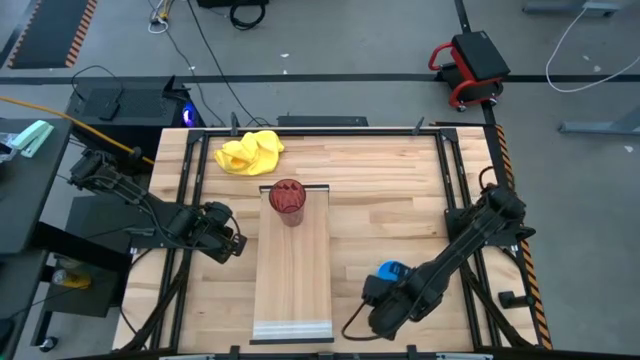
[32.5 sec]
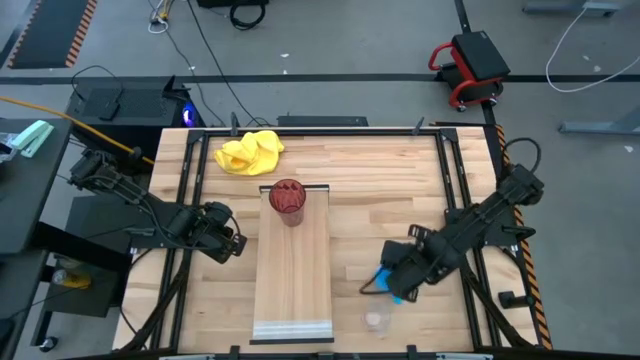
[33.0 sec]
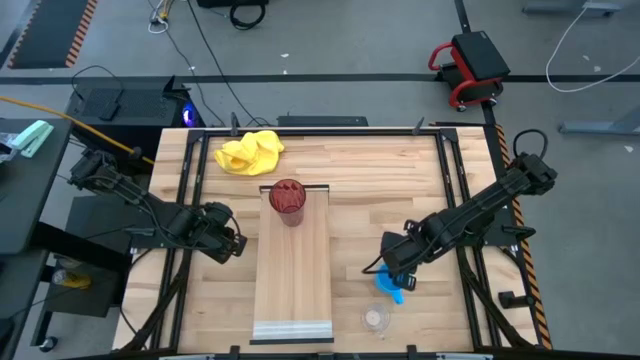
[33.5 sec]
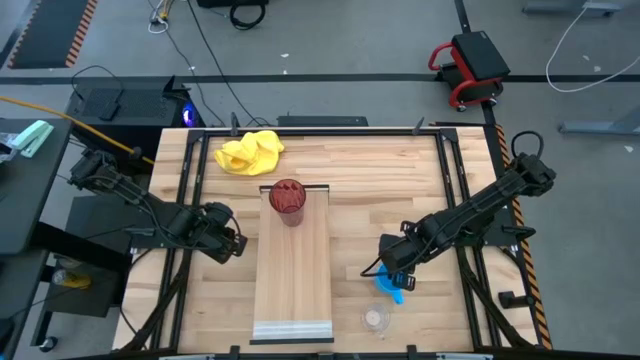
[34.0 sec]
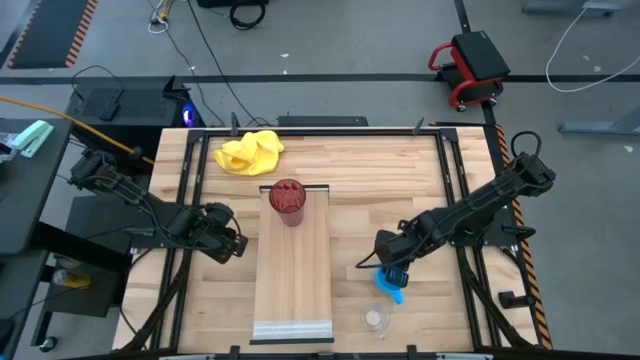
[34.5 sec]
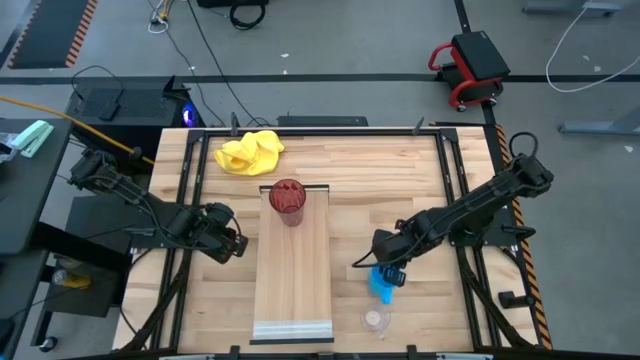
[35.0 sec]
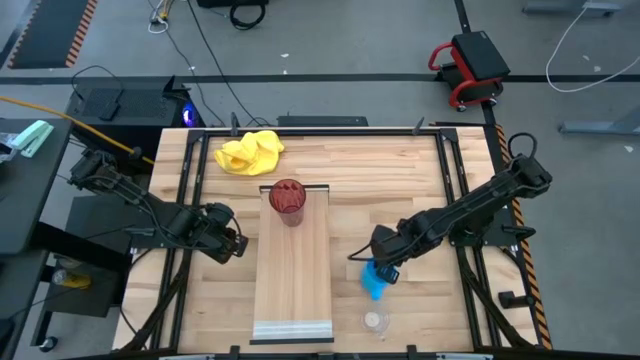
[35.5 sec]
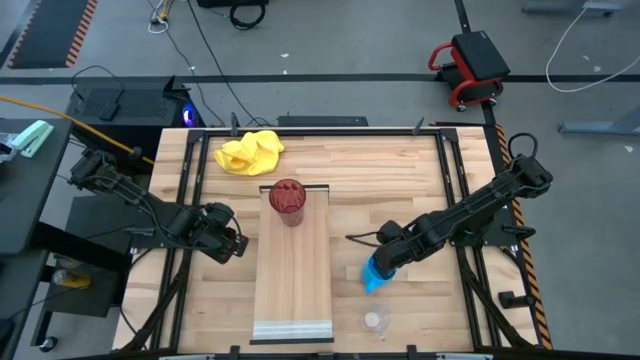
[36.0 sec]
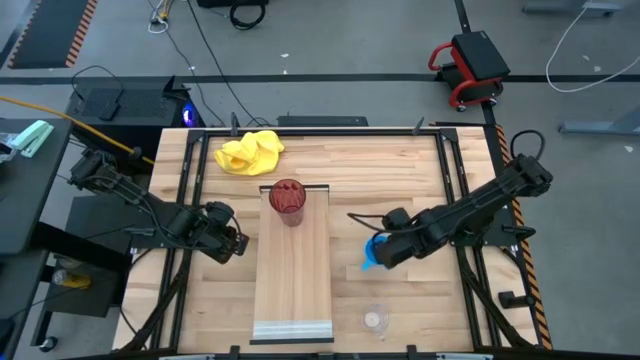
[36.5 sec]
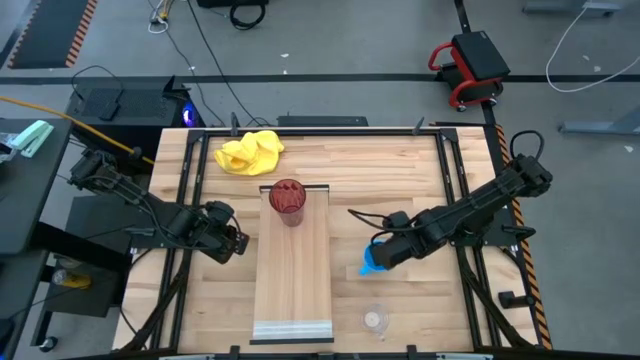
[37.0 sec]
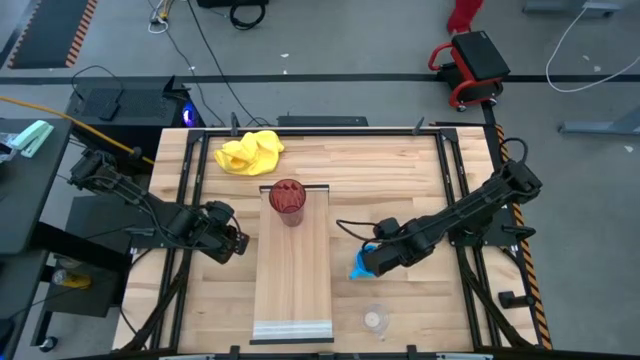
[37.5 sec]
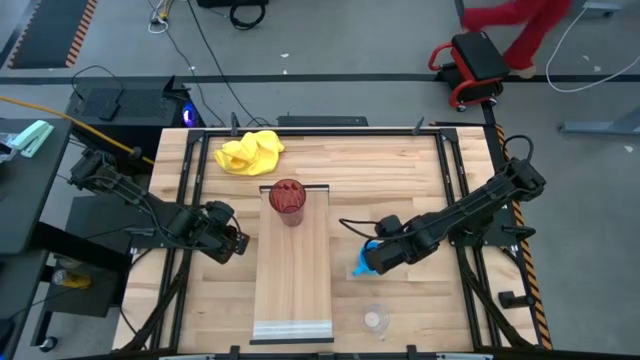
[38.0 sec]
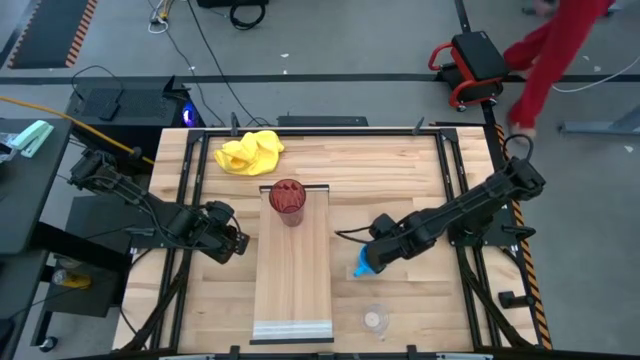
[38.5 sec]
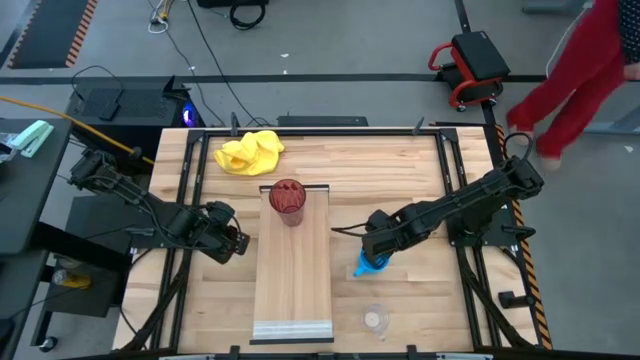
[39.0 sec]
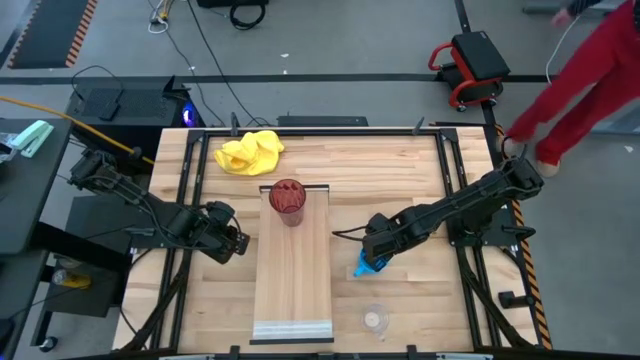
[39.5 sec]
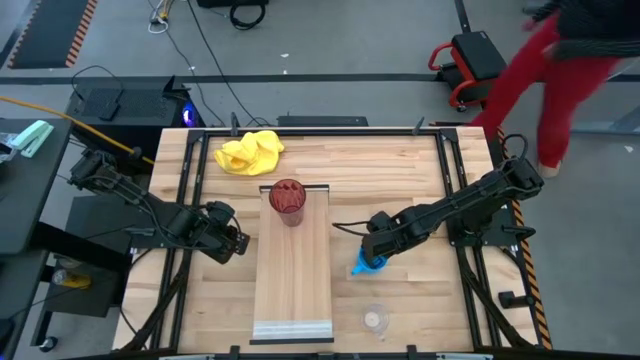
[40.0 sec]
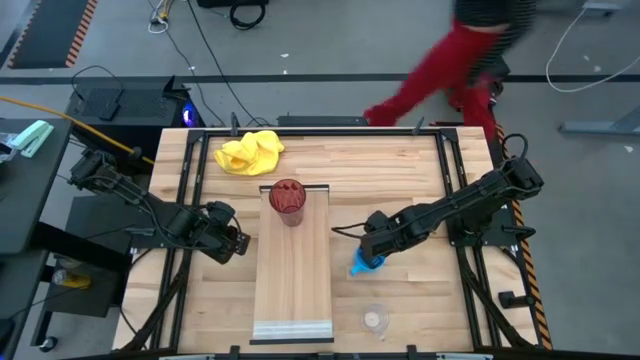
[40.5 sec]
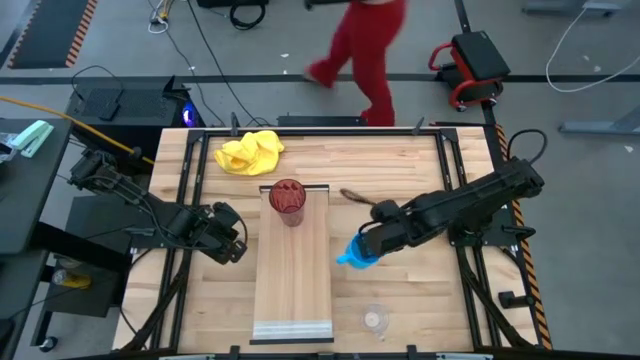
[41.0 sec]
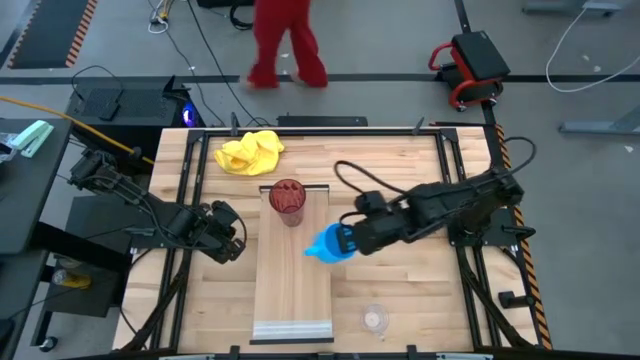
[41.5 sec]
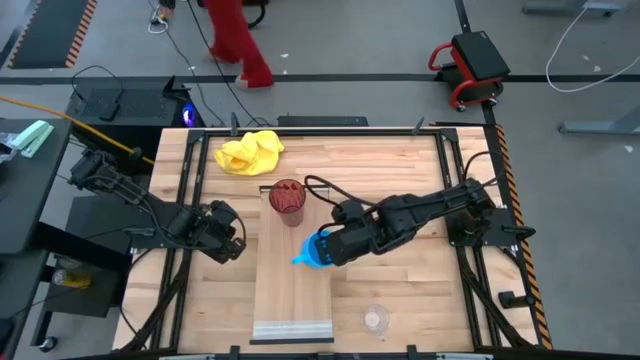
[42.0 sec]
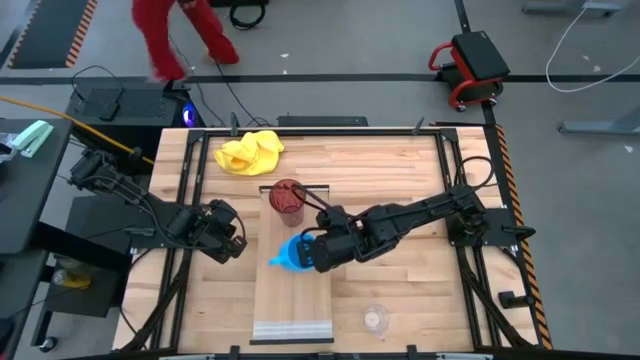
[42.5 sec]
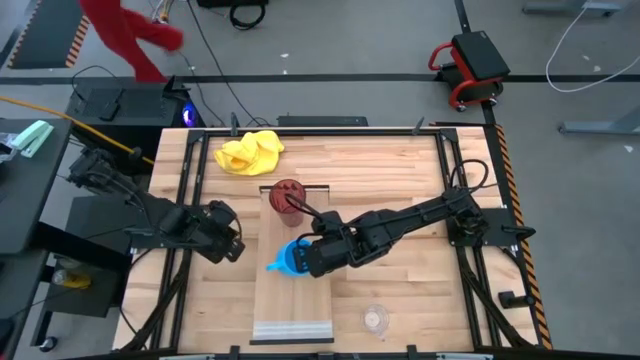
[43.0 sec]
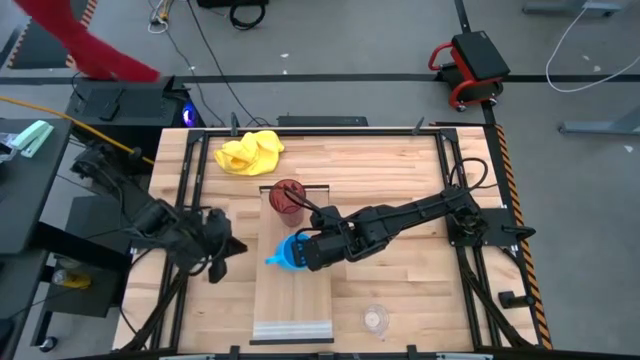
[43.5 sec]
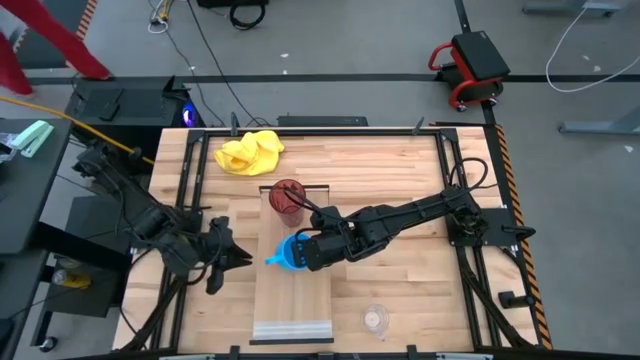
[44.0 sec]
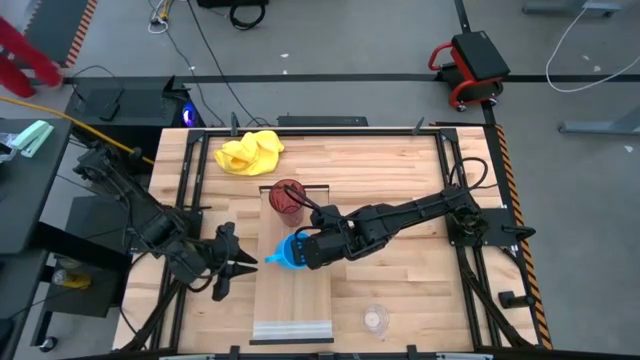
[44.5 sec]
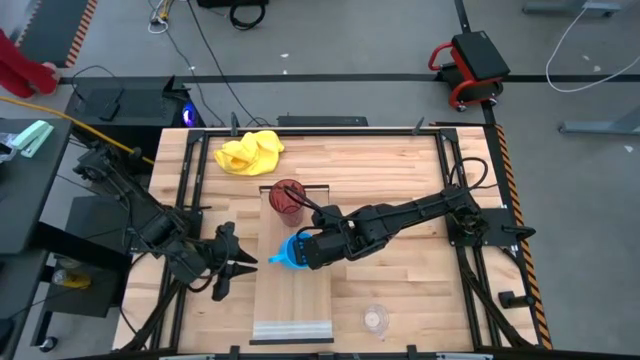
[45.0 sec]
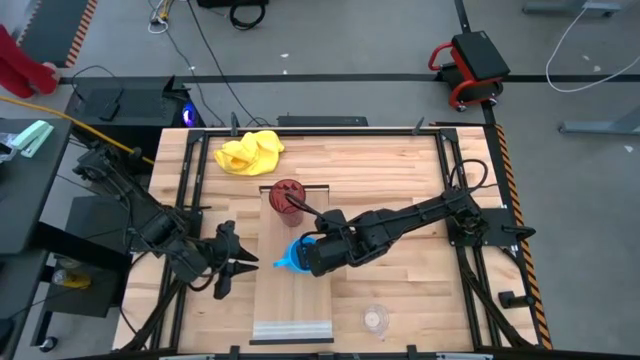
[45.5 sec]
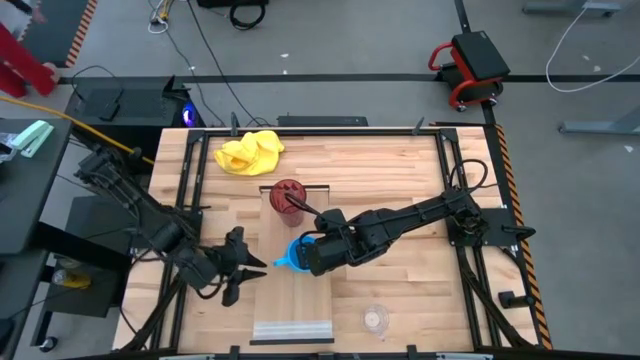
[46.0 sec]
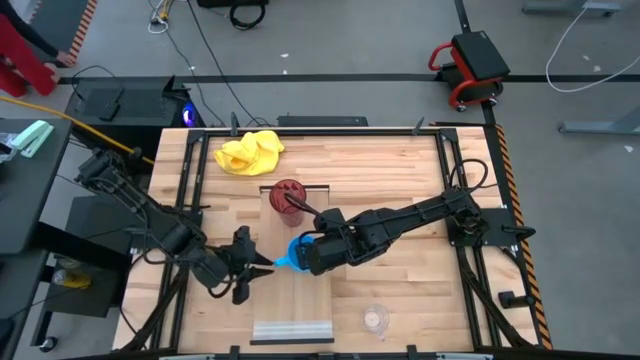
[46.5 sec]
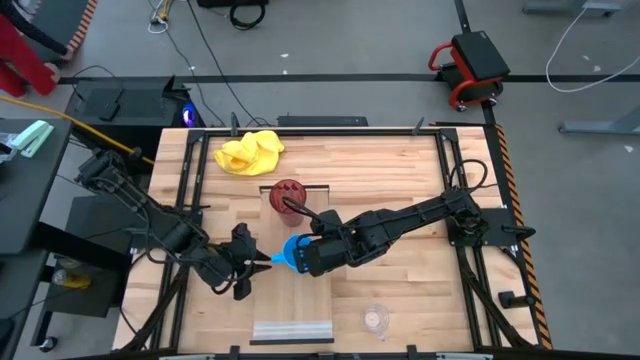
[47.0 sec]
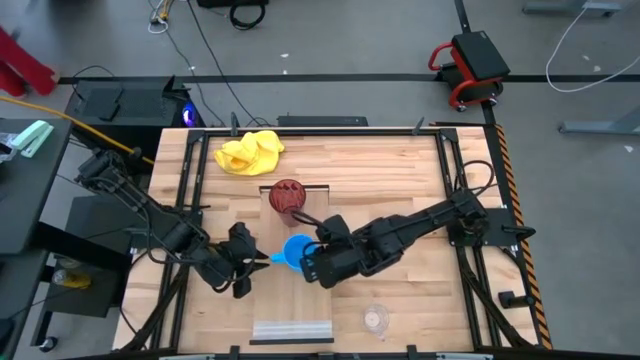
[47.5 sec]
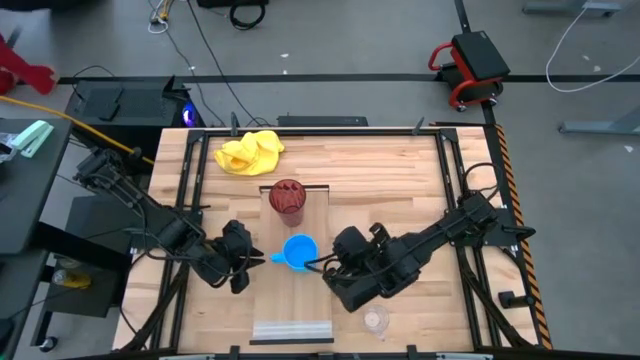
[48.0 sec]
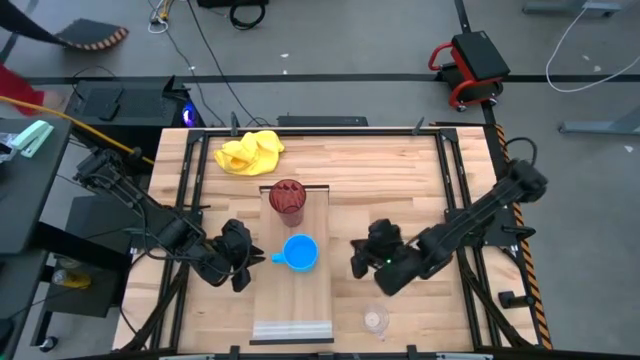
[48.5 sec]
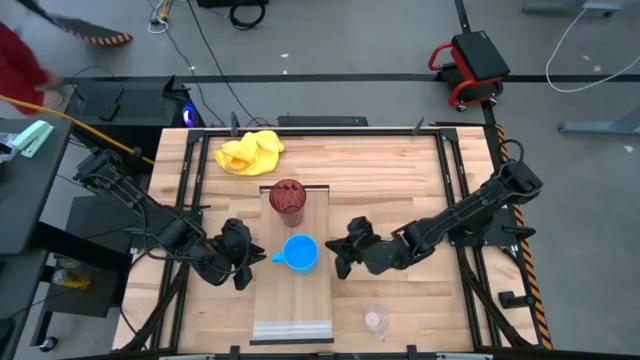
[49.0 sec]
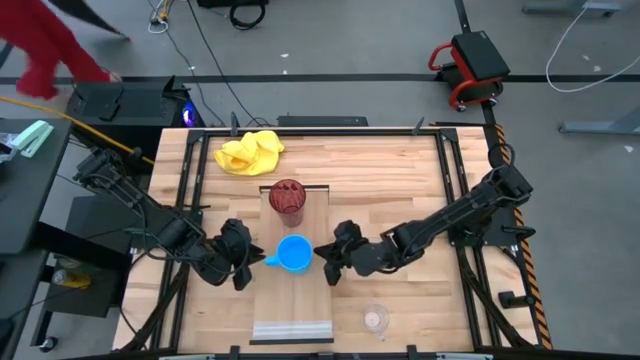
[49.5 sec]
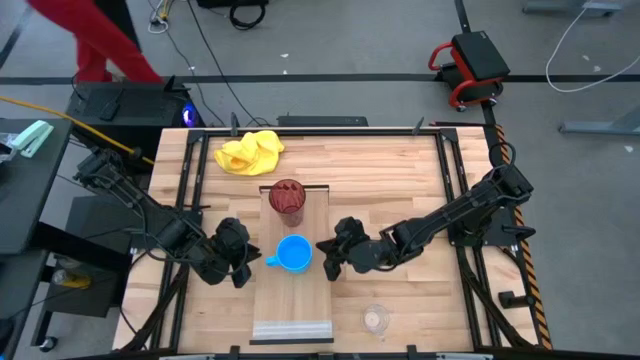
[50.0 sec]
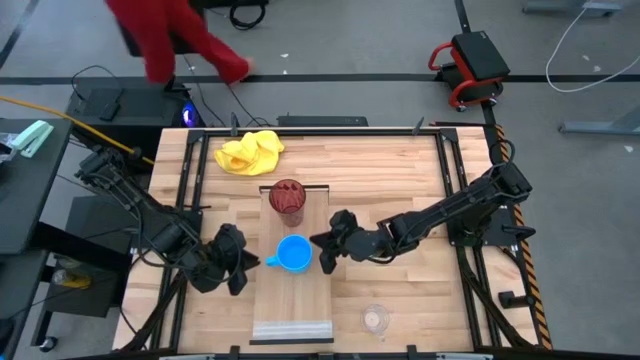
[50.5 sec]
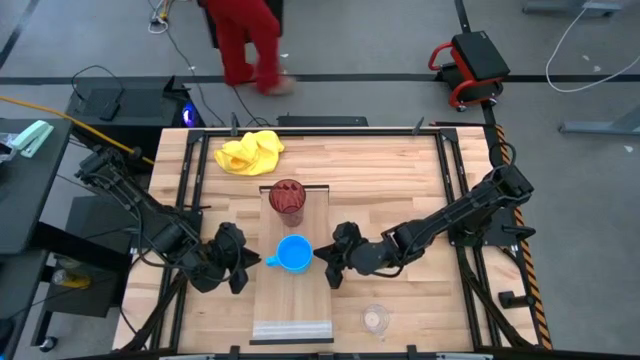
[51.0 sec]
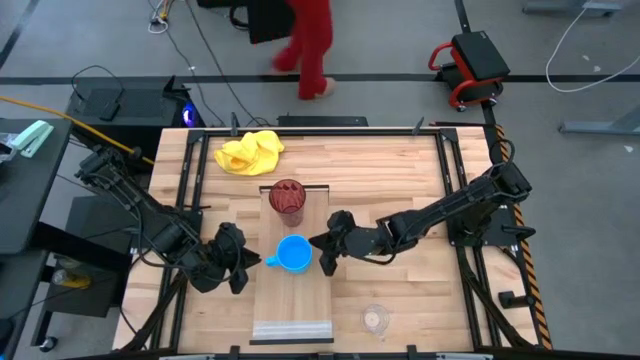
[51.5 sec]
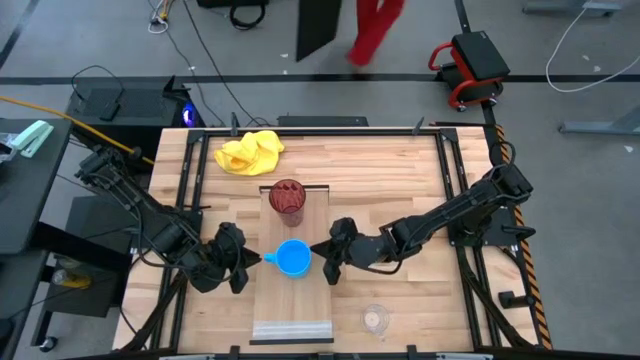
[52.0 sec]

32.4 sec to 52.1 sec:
Task: Stack small to large cups/mugs on shelf
Put the blue mug on the shelf

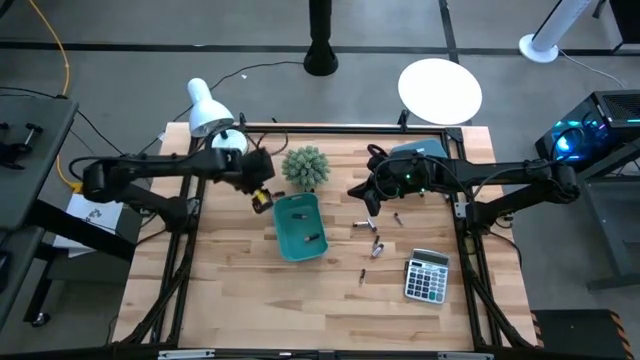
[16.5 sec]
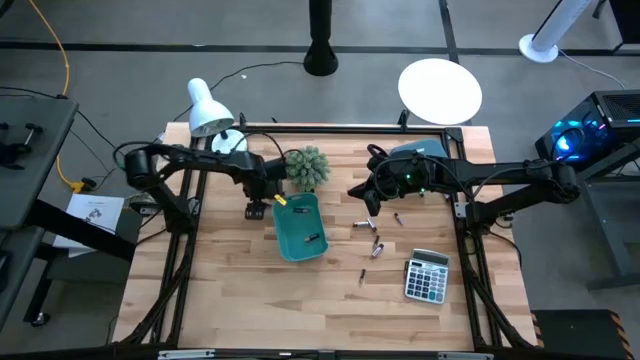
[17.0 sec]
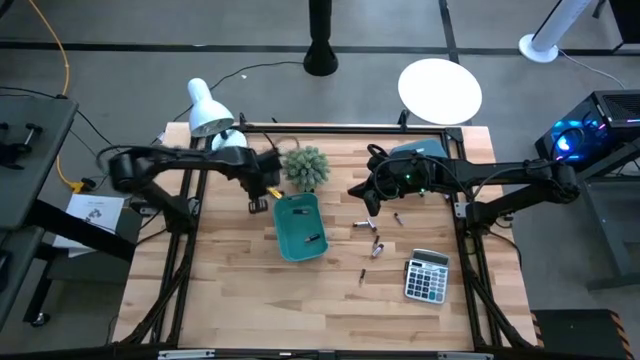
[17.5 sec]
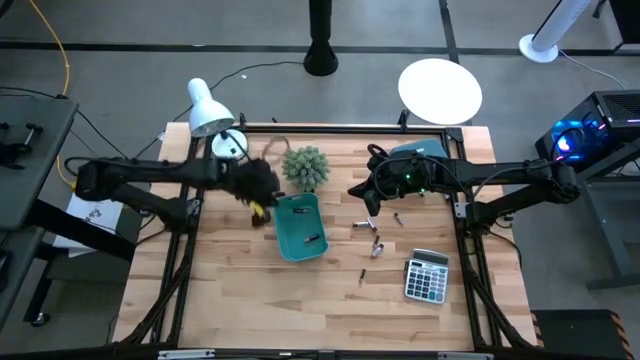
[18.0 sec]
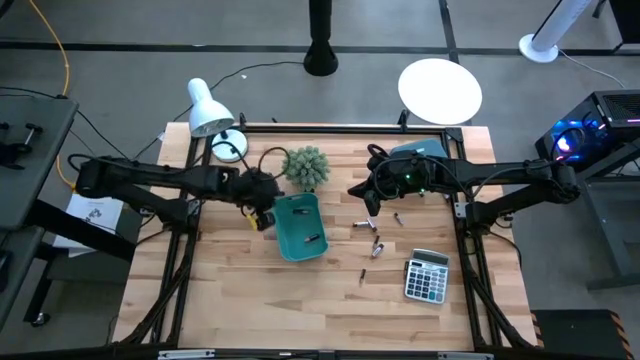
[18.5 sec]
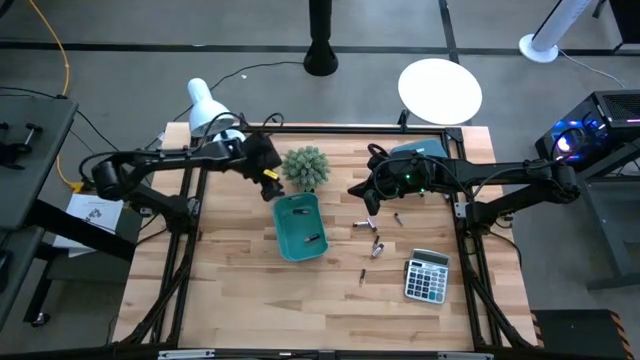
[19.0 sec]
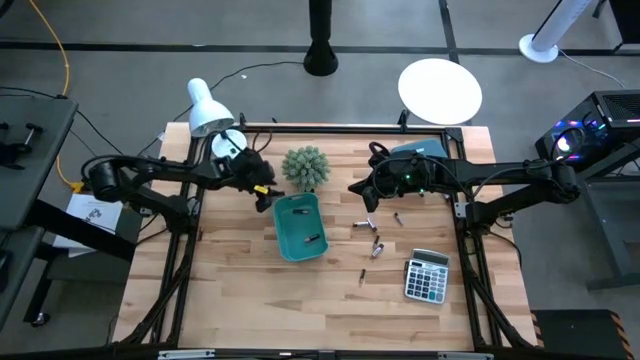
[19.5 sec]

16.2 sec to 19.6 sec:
Task: Sort batteries
Put the black battery into the green bin
